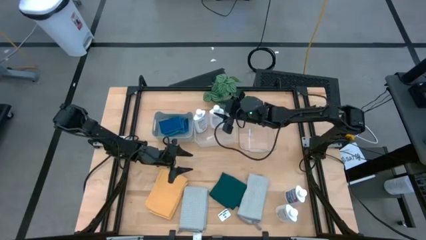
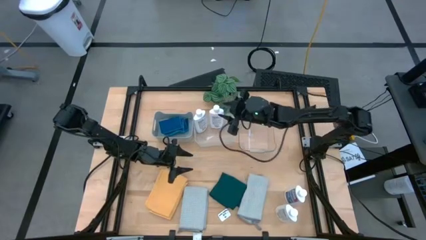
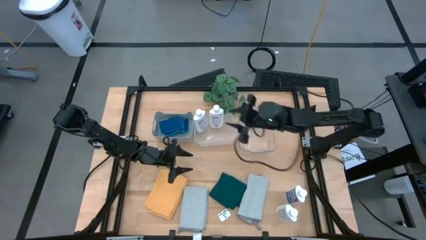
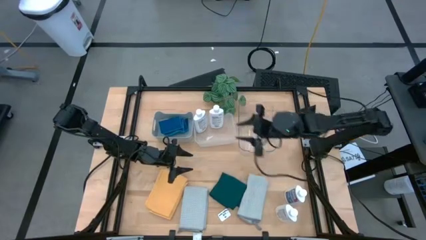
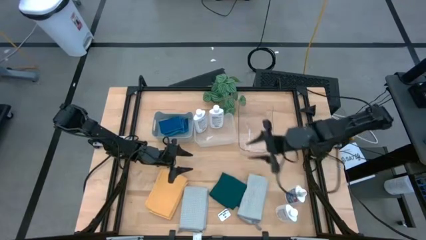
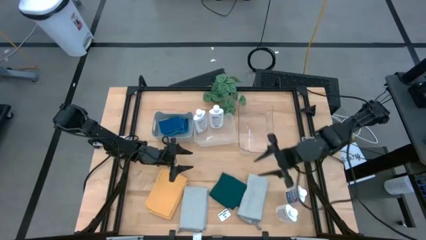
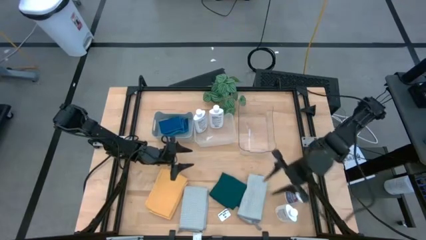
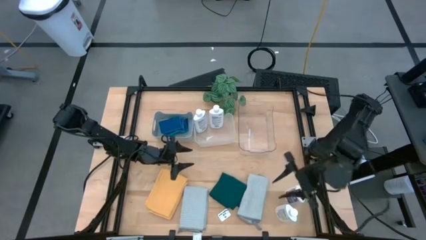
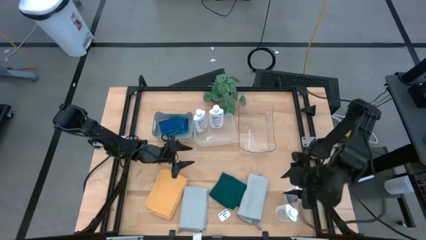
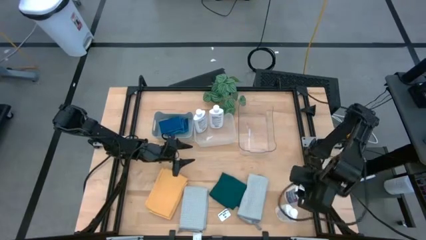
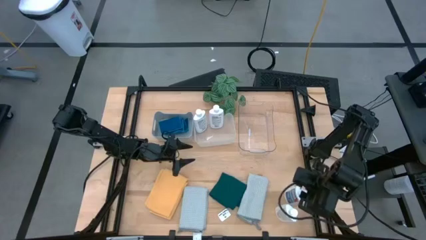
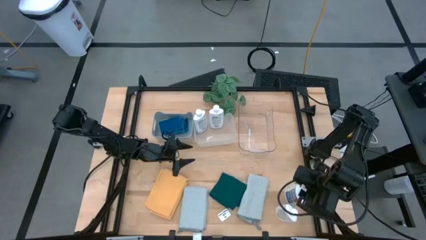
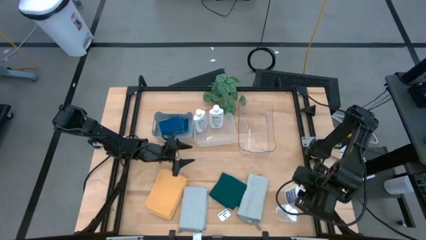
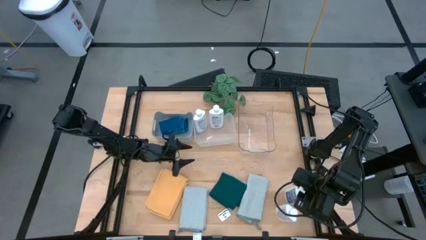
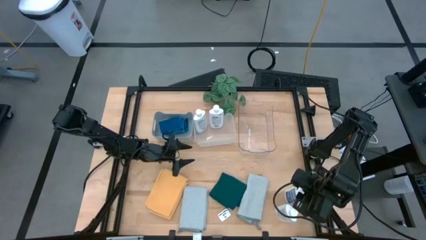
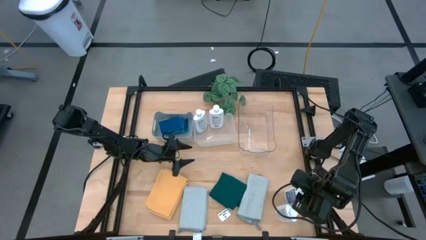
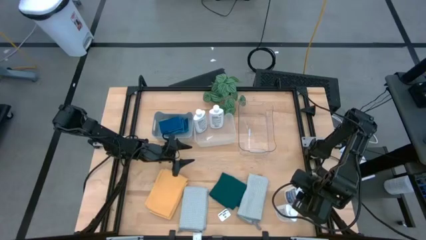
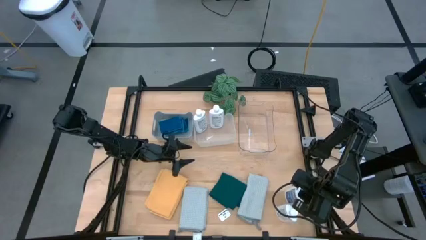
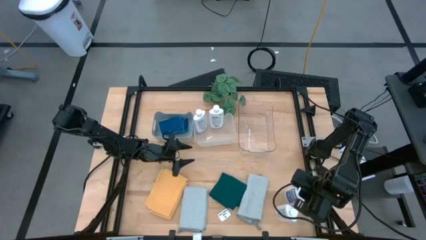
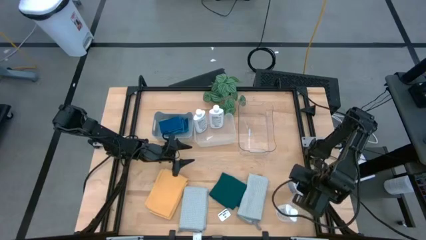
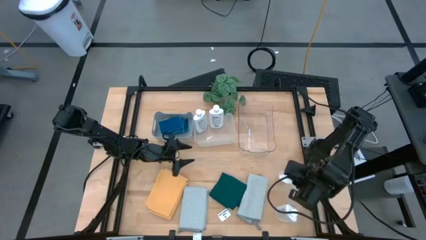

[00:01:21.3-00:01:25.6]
Task: Pick & Place Kitchen Items
Put the white plastic restorer bottle into the white bin

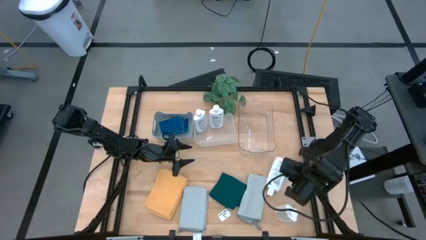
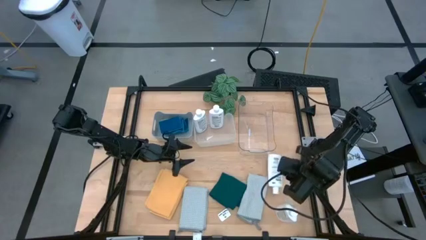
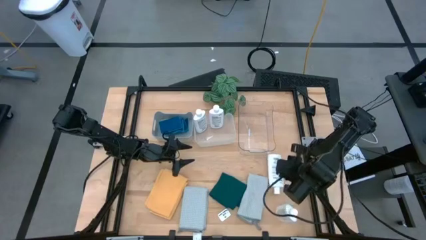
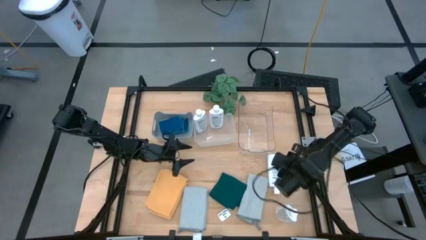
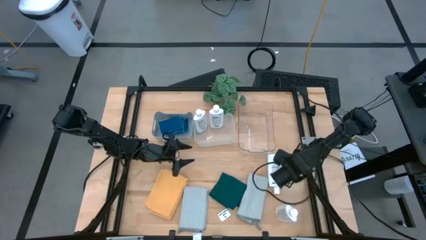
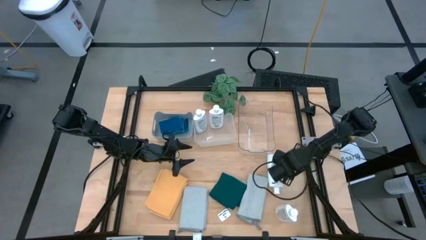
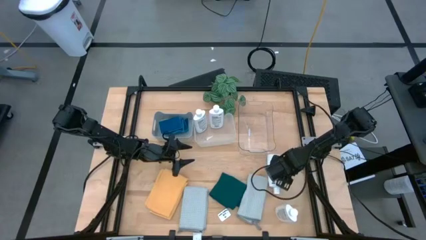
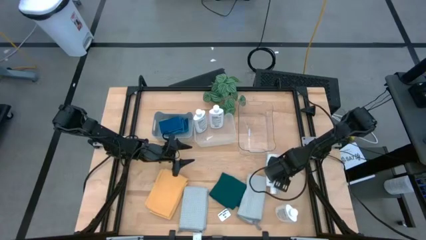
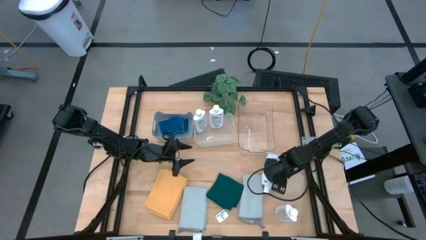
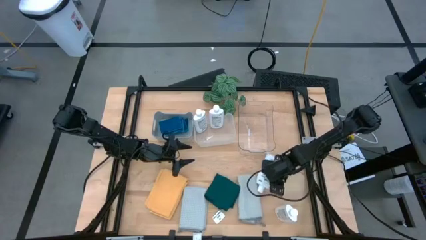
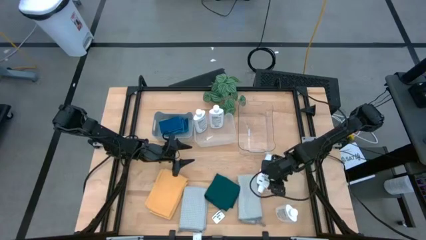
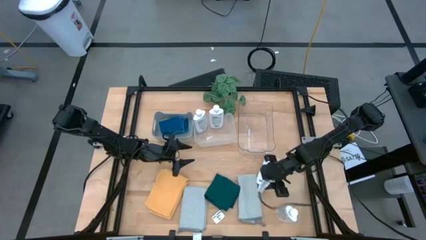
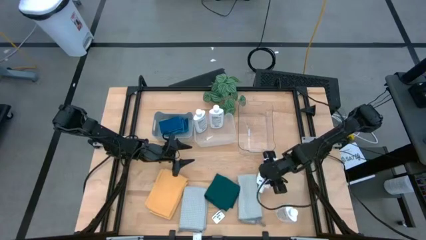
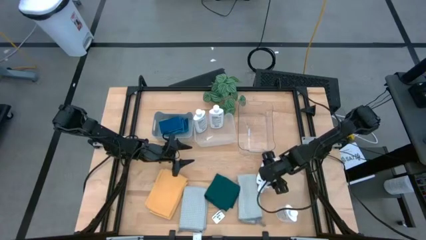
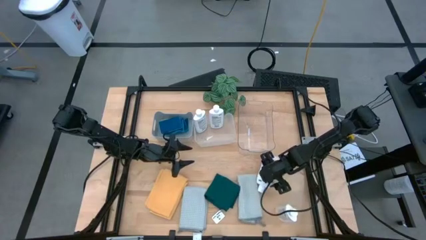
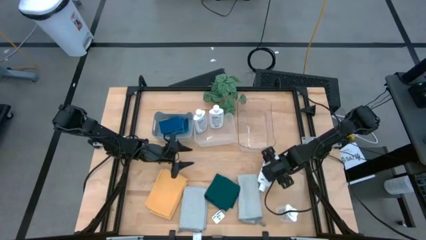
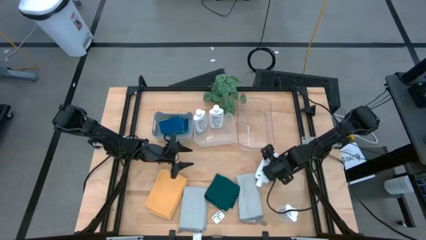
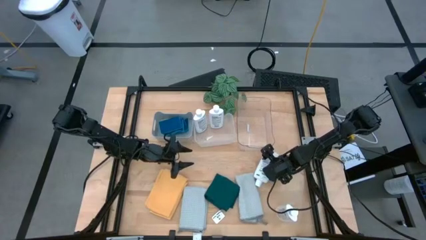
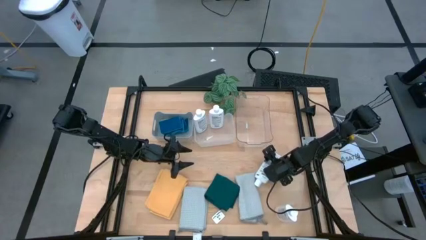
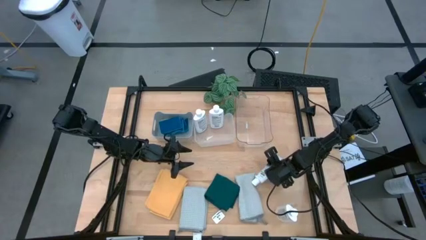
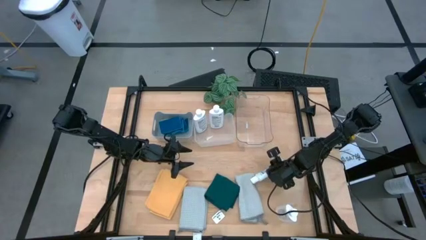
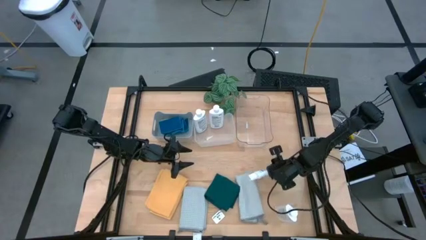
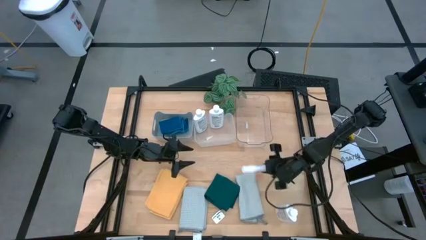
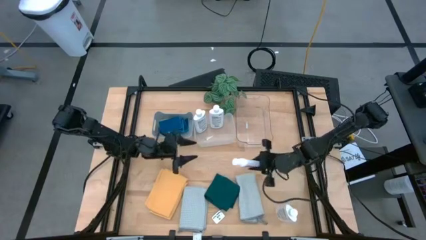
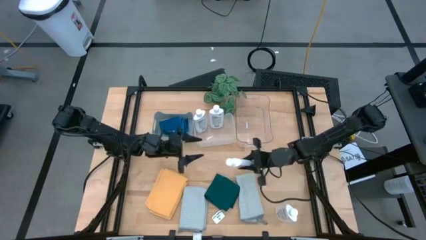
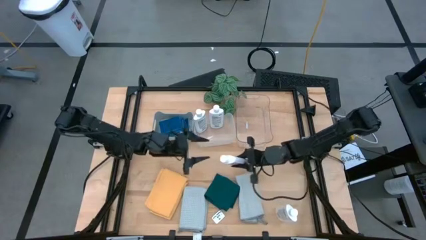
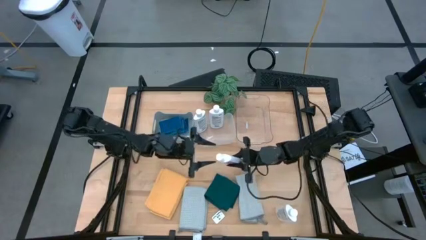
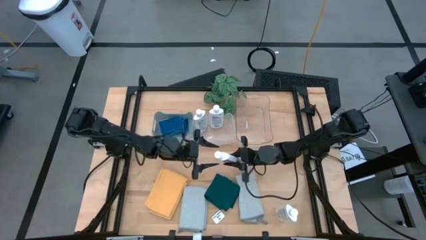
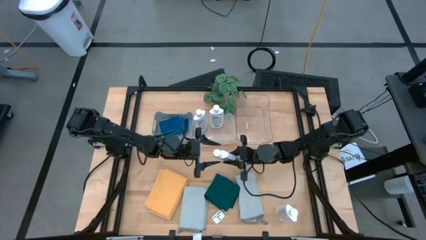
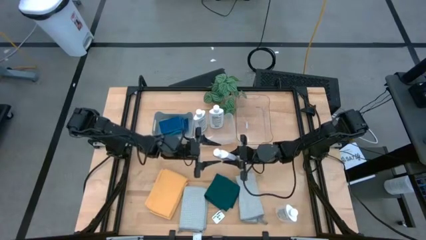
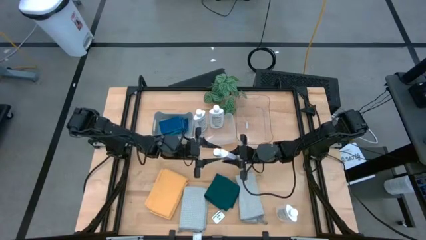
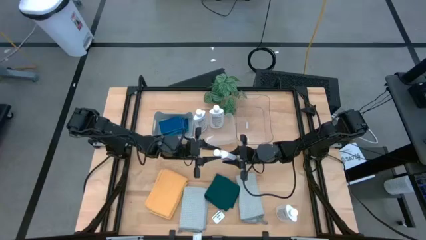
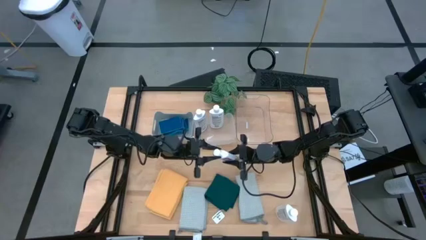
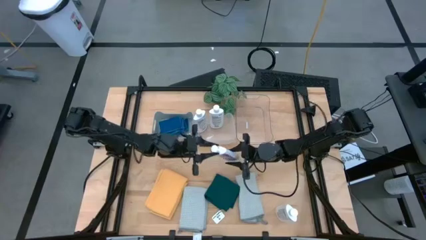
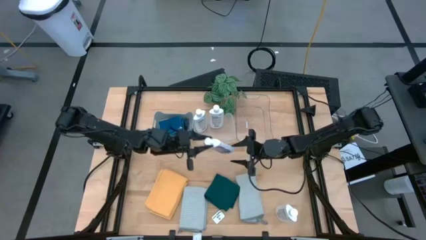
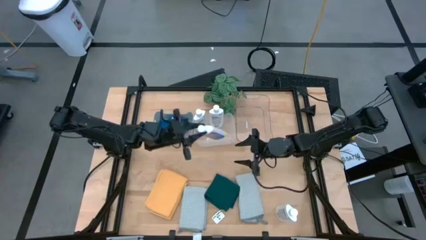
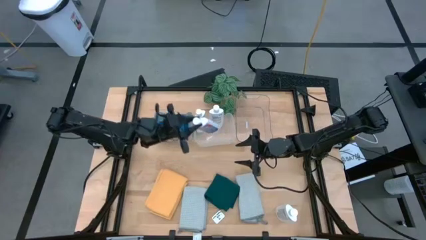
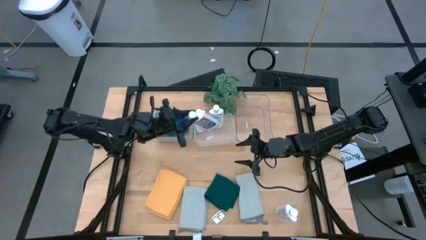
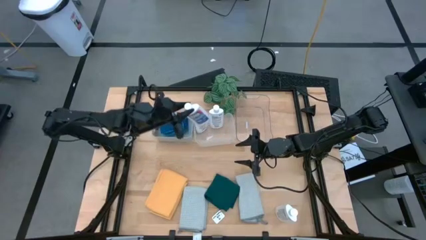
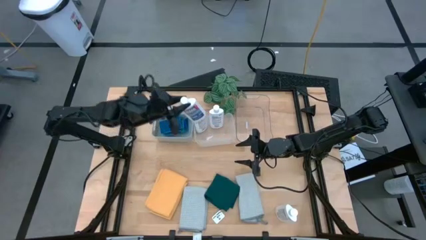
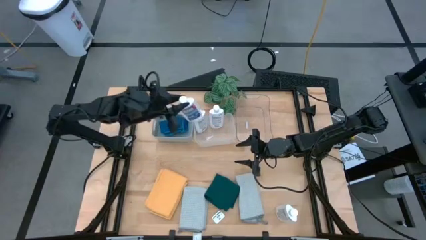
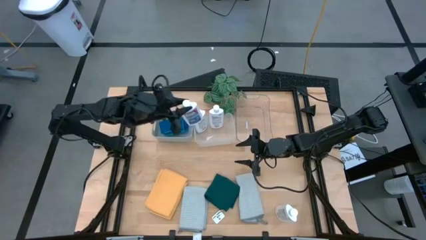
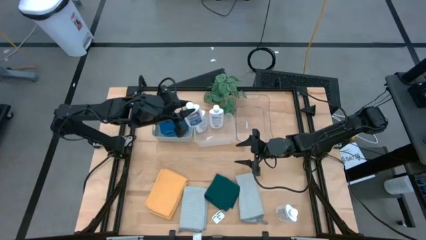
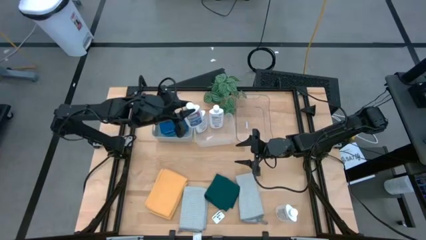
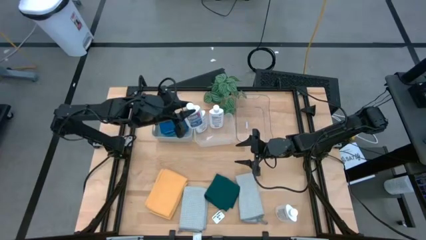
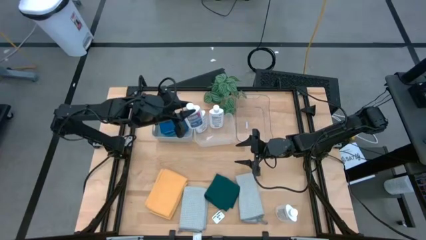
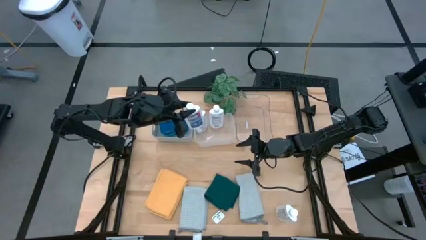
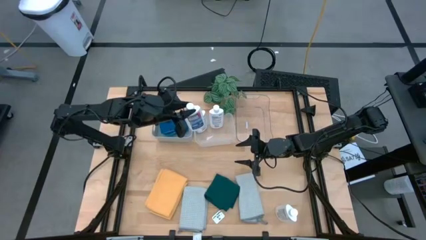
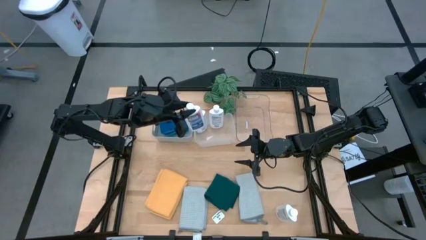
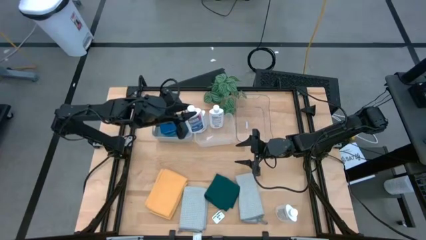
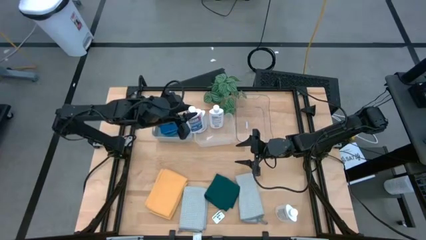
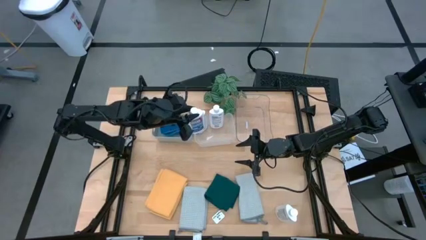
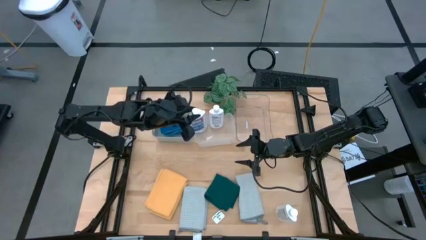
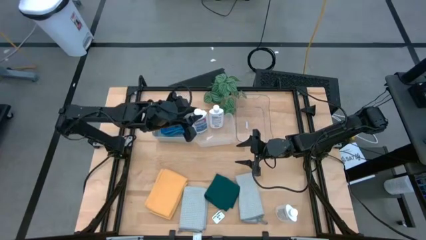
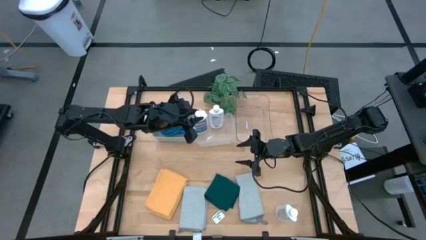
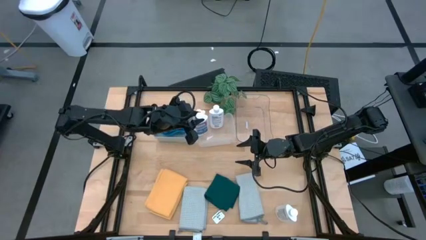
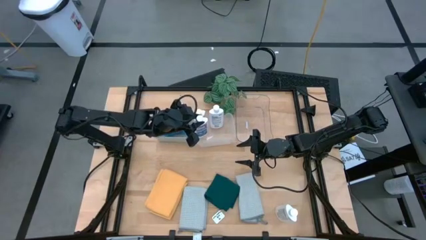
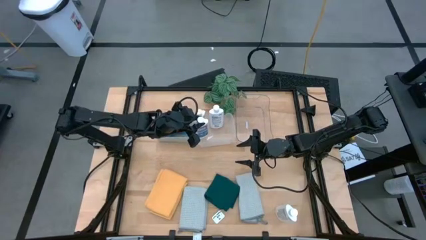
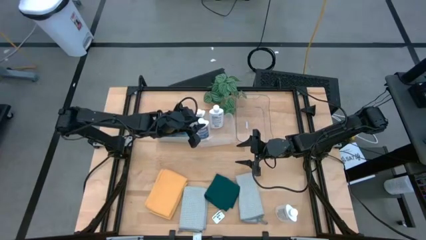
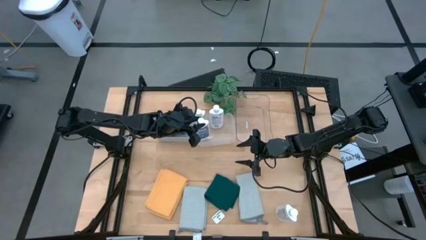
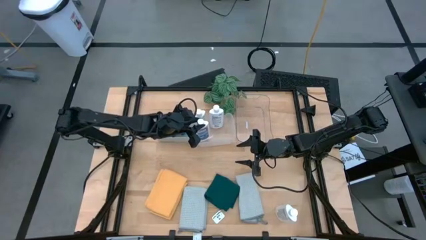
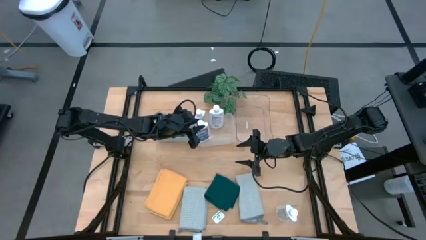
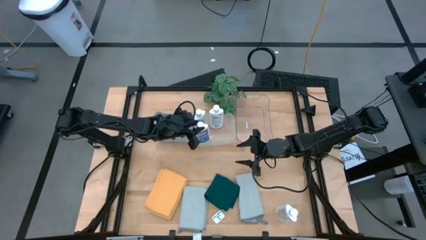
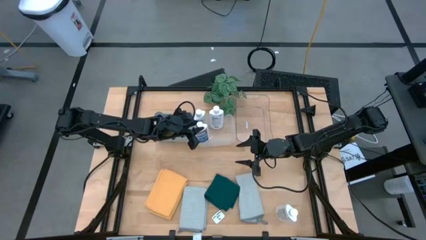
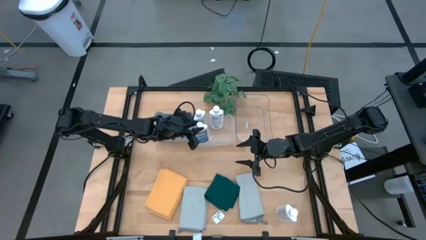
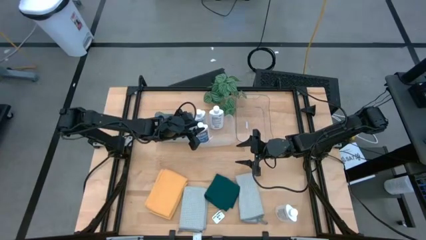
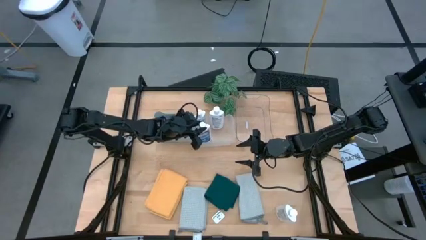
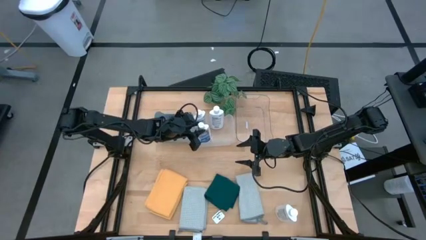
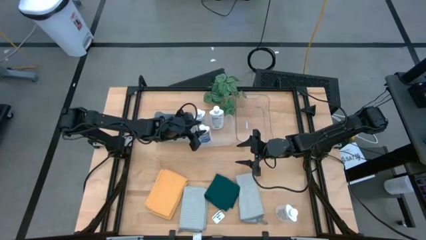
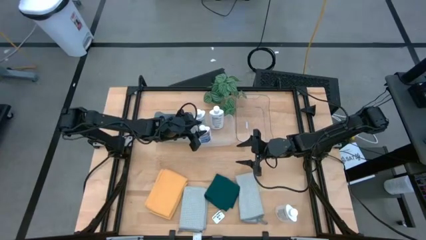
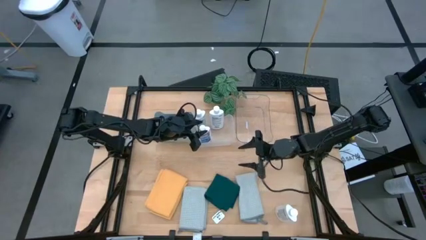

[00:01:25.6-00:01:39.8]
Put the white plastic restorer bottle into the white bin
